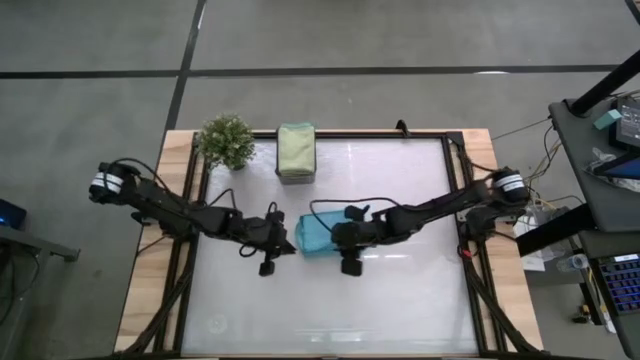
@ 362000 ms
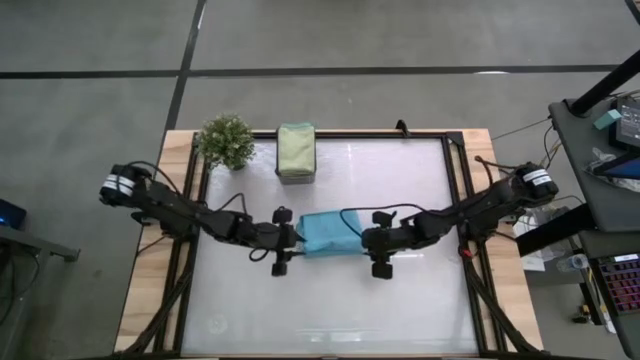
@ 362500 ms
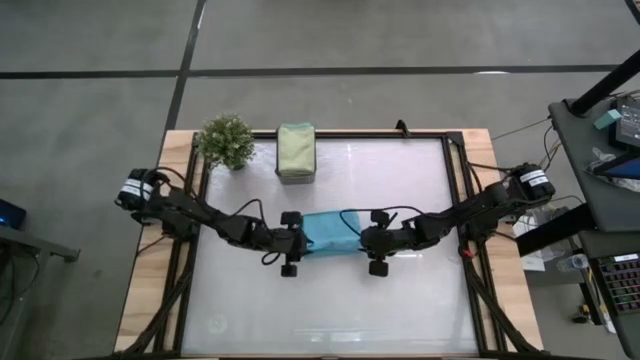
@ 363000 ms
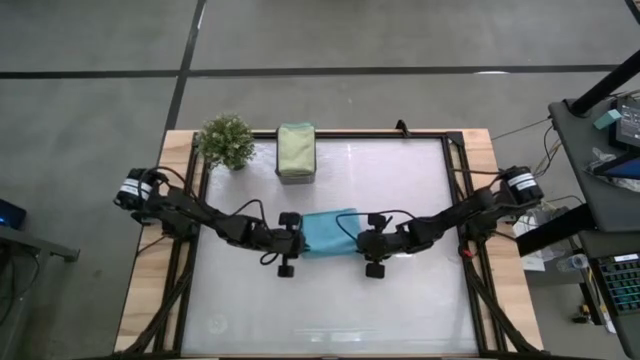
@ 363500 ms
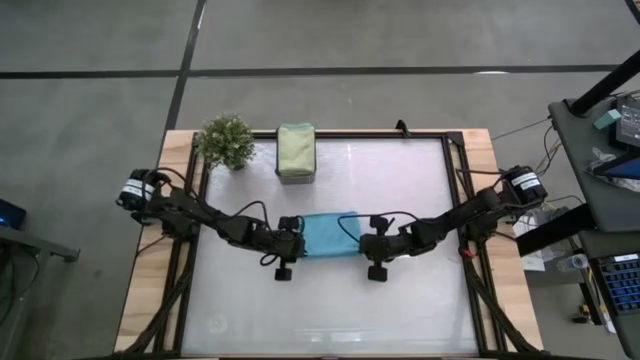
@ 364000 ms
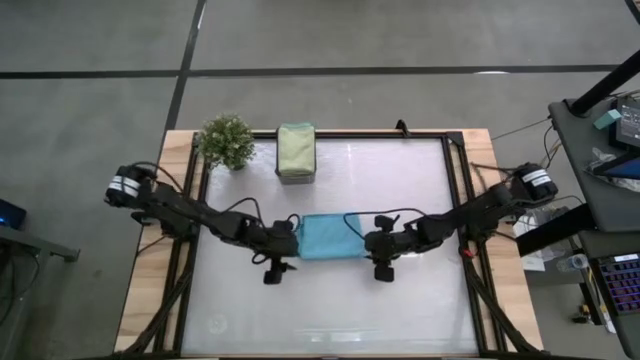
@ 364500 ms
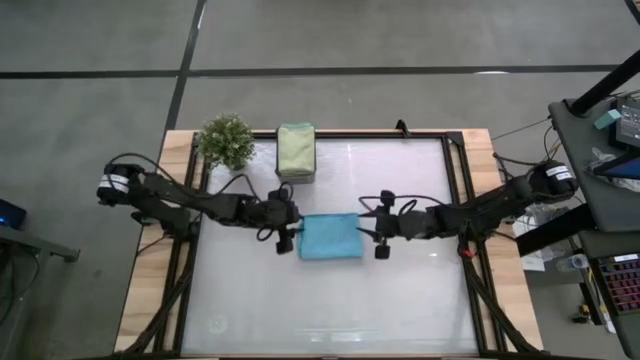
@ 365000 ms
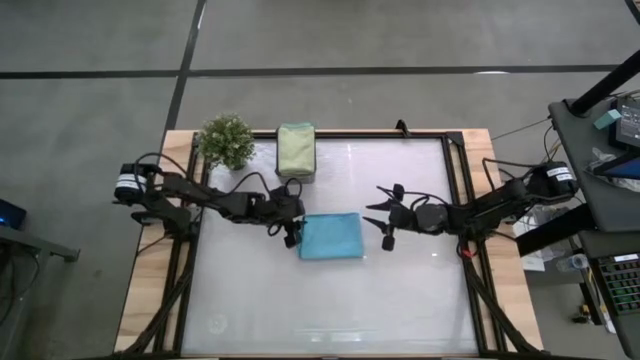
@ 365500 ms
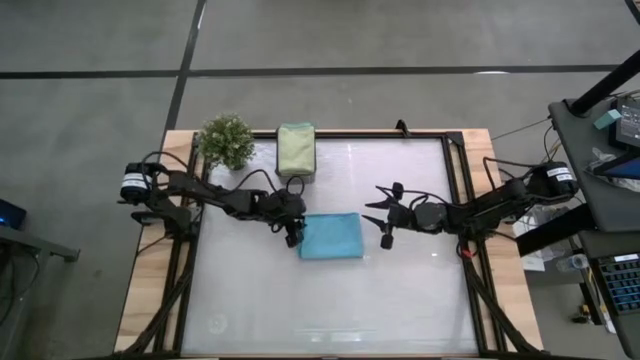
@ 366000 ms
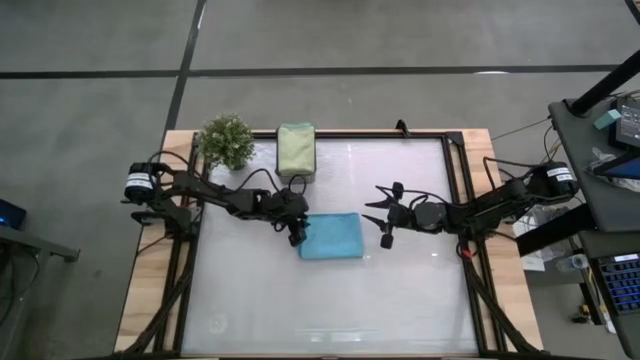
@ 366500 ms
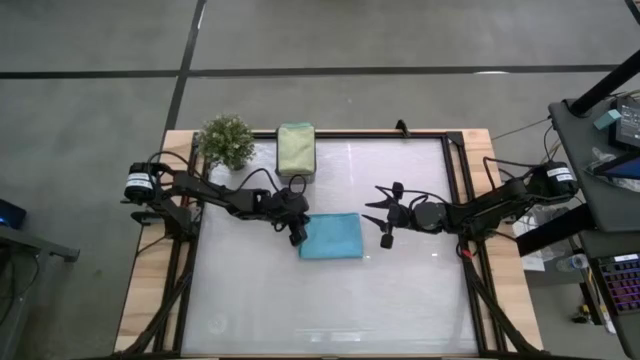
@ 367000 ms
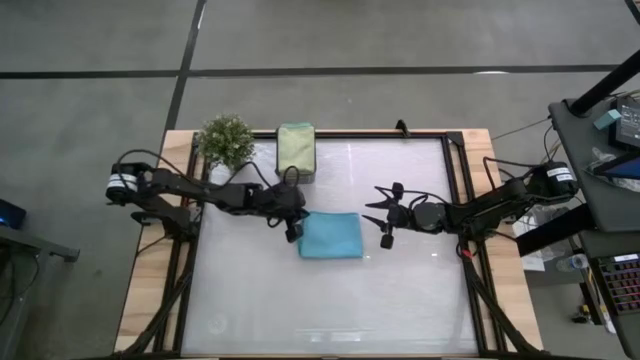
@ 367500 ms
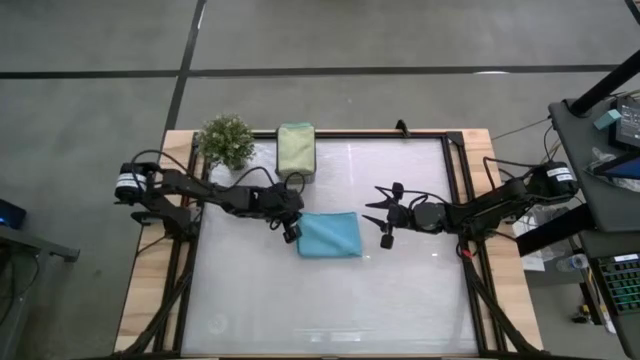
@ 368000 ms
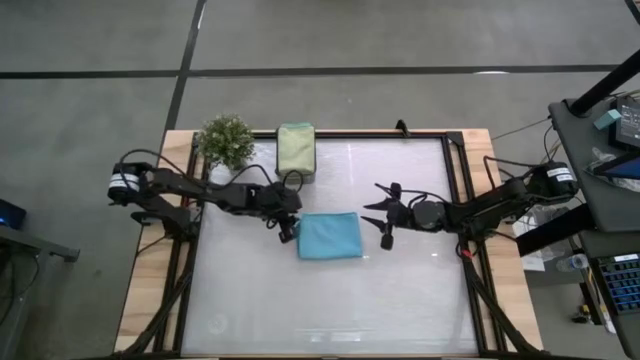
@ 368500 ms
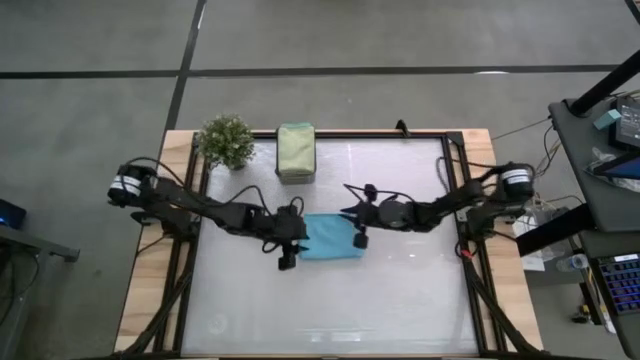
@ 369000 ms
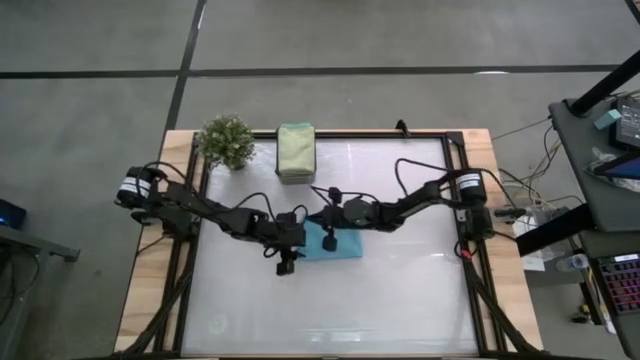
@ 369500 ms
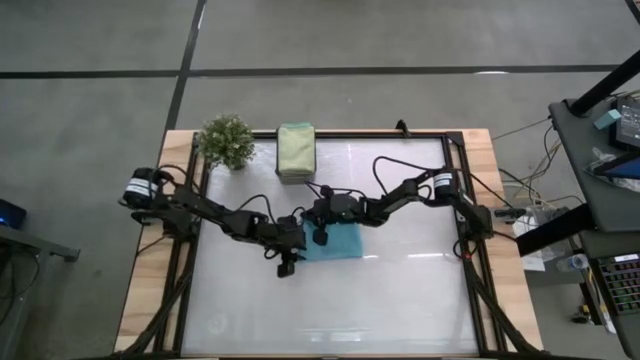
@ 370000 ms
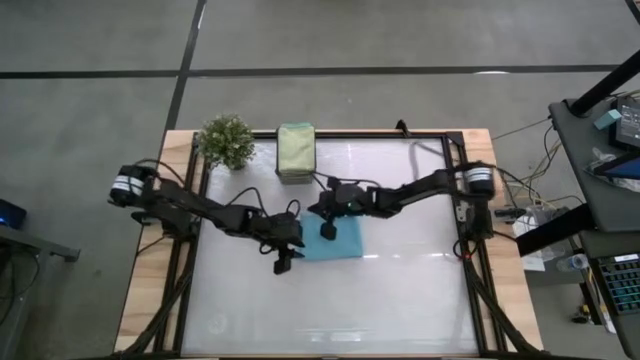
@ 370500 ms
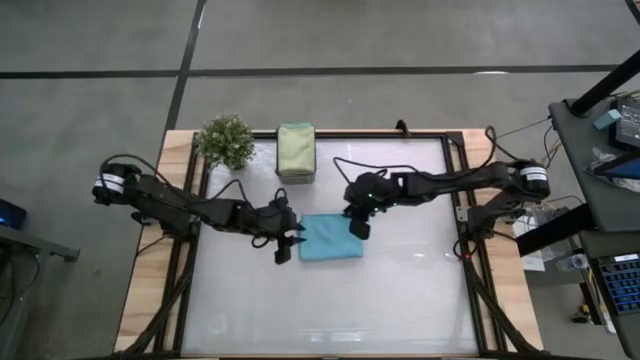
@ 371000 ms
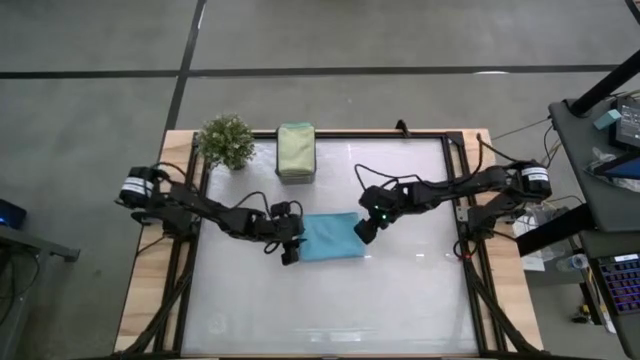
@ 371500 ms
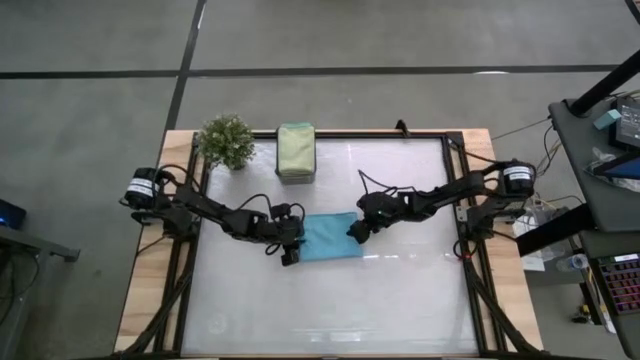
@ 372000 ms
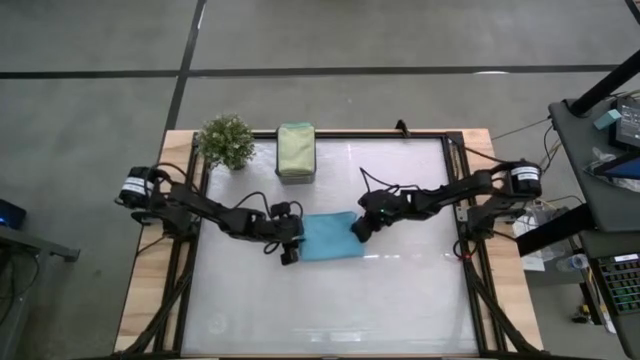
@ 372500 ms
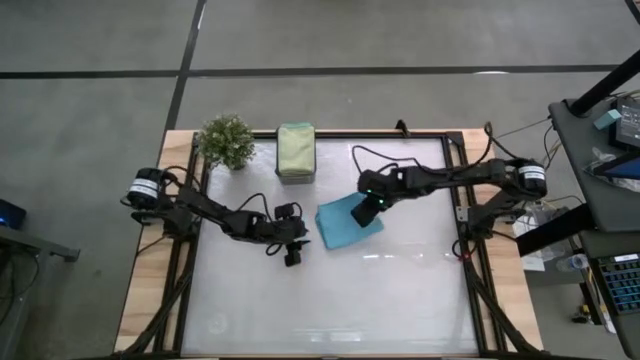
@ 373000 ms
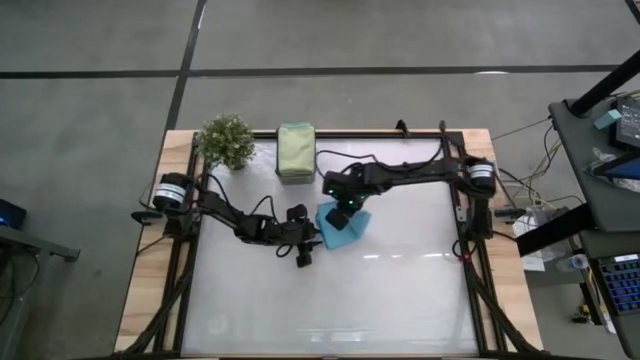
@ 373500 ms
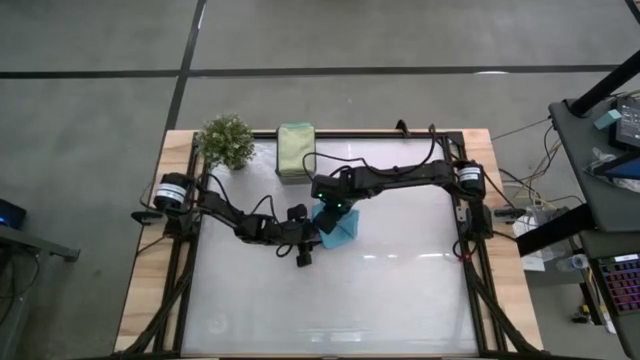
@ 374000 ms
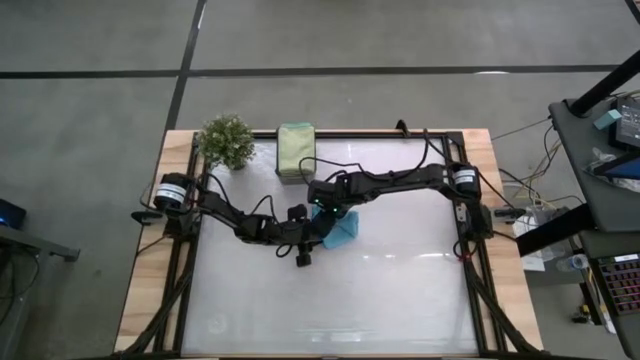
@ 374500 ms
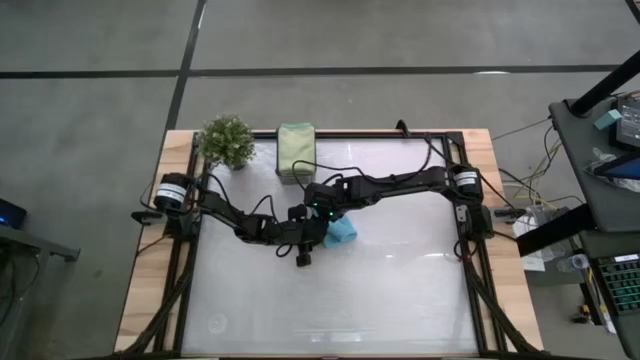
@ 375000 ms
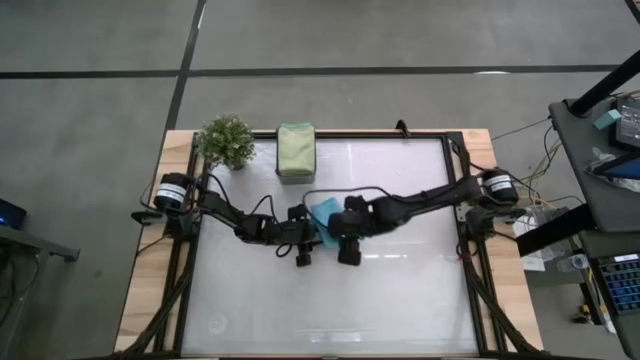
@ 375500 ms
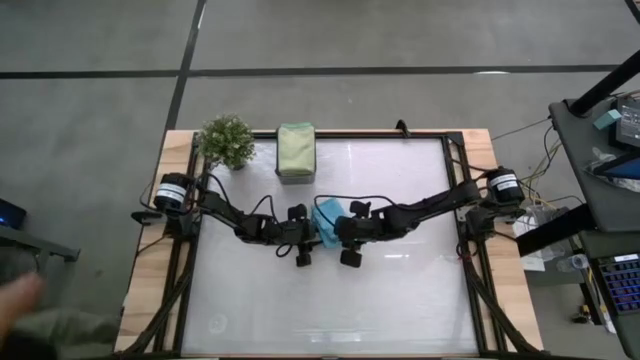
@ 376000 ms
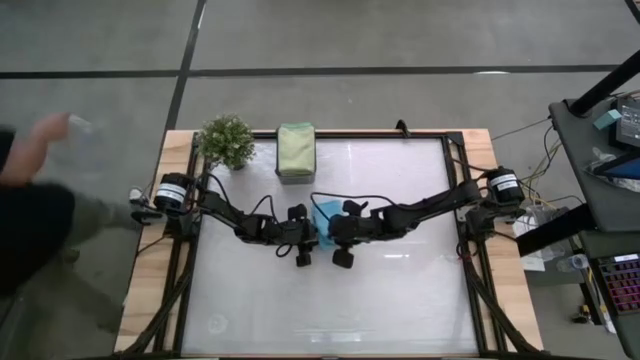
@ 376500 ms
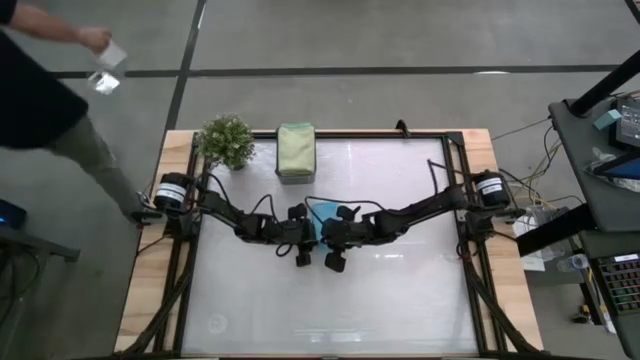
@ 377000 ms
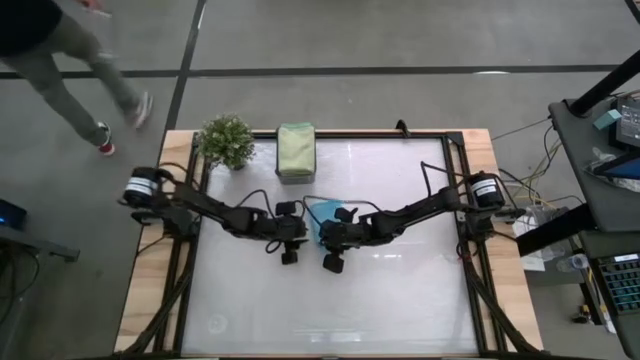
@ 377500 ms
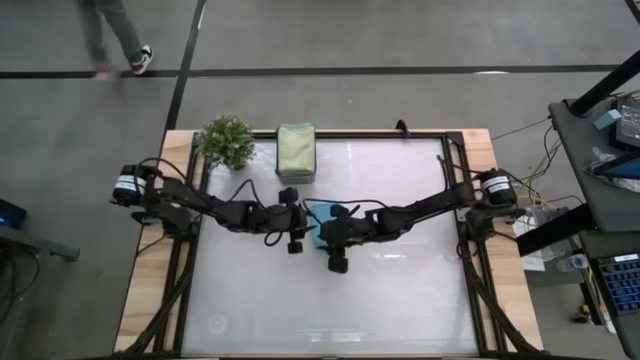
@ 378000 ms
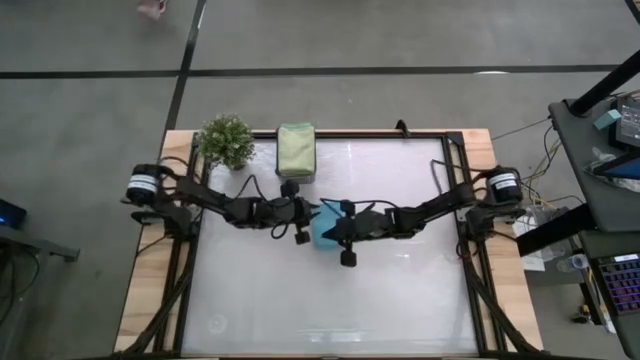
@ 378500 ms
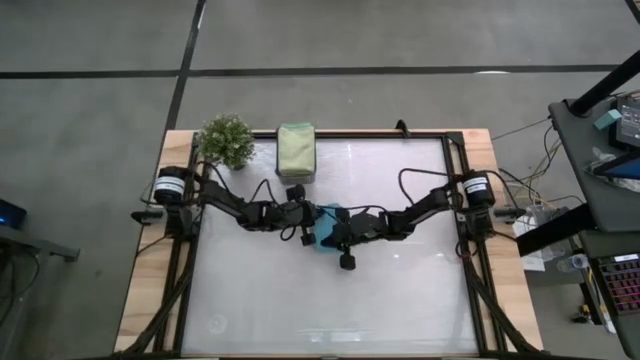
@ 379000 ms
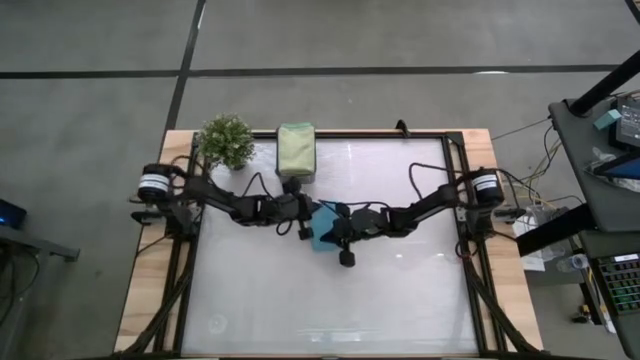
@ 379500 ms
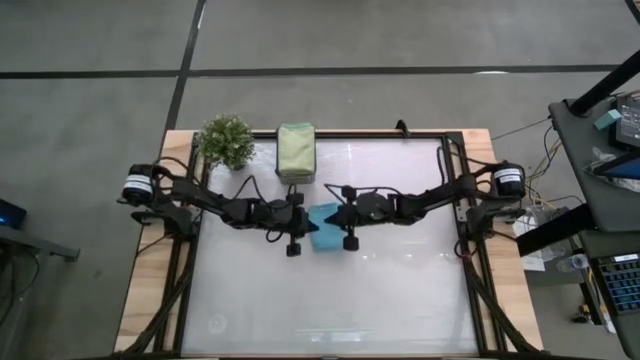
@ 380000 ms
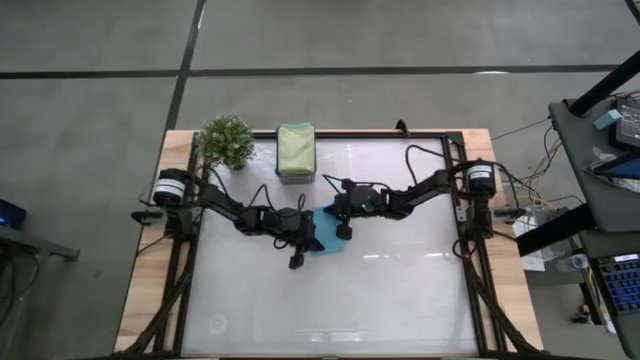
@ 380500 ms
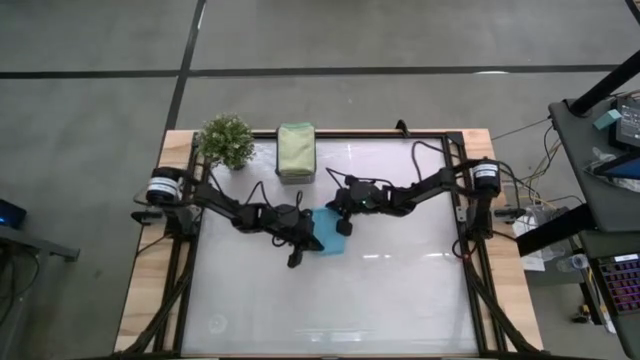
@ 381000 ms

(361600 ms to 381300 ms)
Task: Fold microfiber towels
Fold the blue towel
